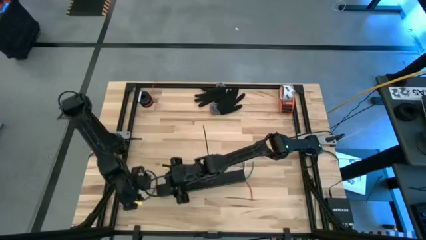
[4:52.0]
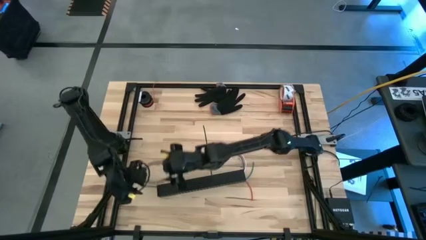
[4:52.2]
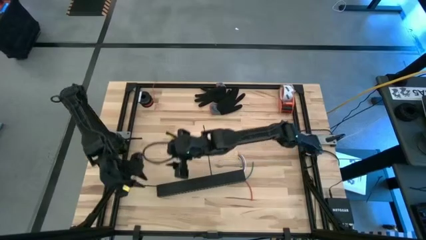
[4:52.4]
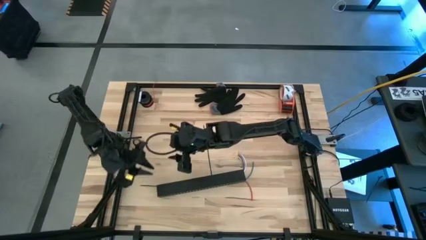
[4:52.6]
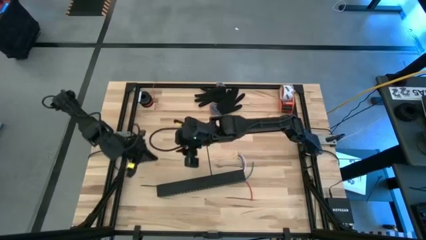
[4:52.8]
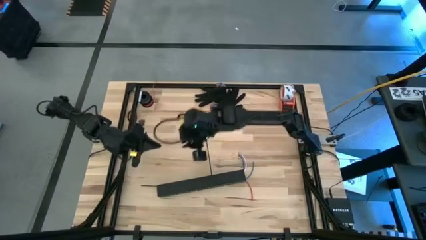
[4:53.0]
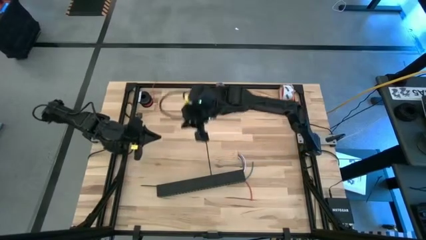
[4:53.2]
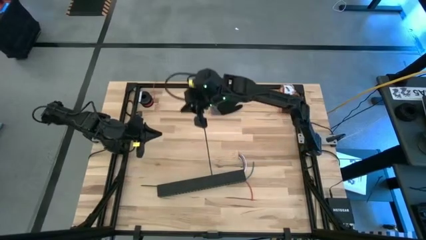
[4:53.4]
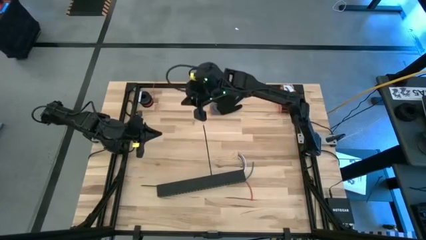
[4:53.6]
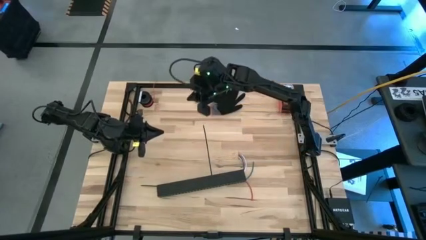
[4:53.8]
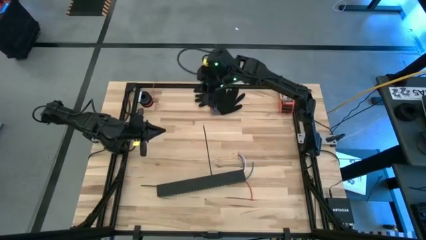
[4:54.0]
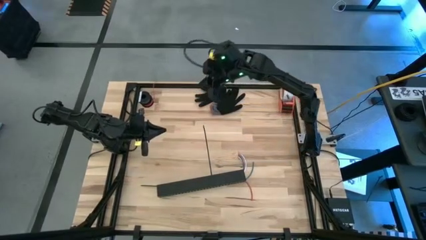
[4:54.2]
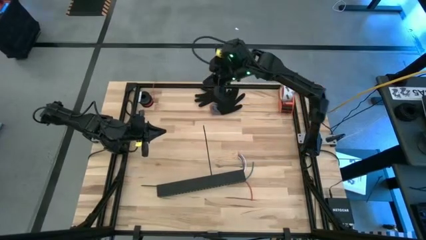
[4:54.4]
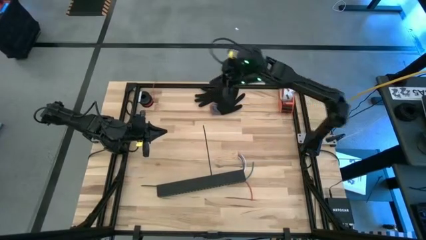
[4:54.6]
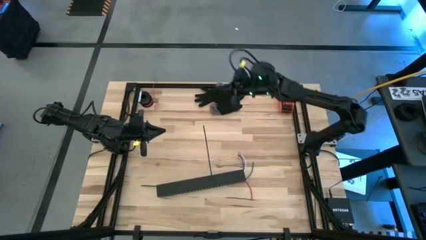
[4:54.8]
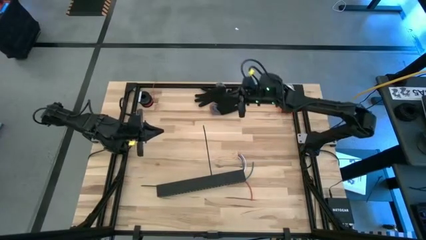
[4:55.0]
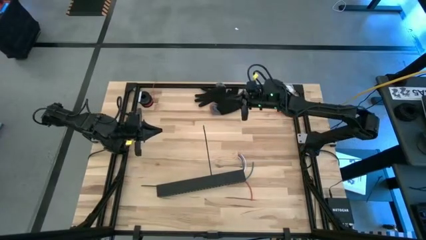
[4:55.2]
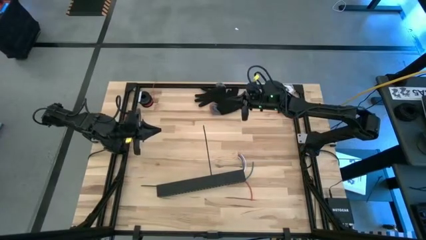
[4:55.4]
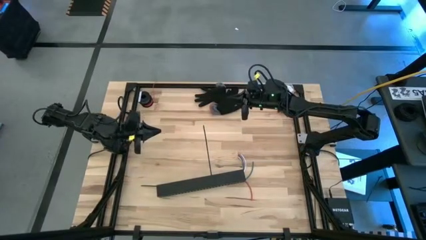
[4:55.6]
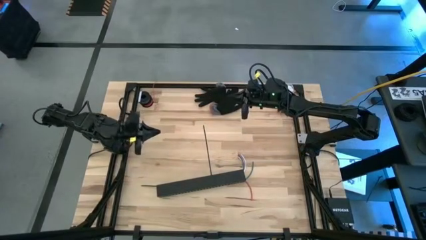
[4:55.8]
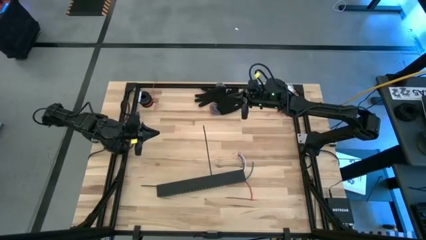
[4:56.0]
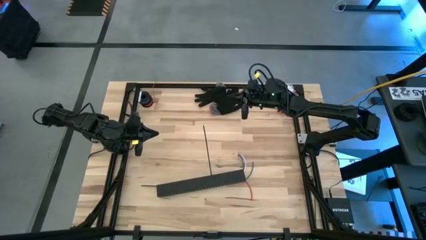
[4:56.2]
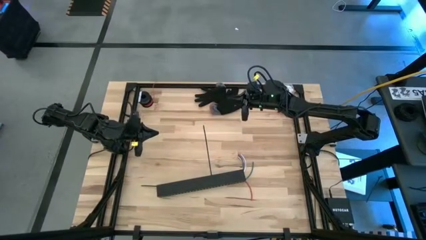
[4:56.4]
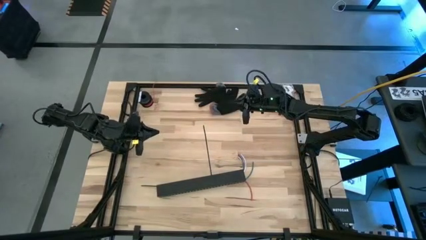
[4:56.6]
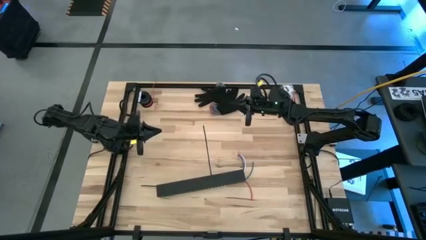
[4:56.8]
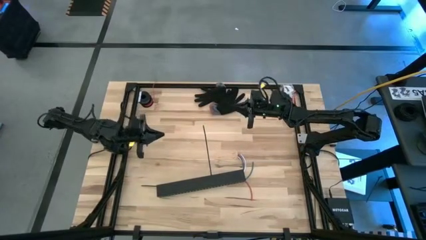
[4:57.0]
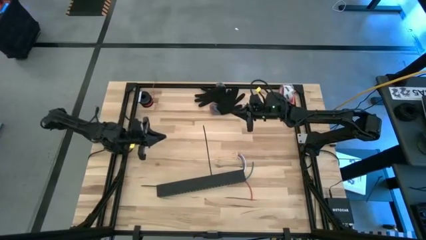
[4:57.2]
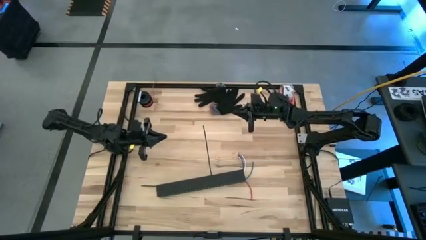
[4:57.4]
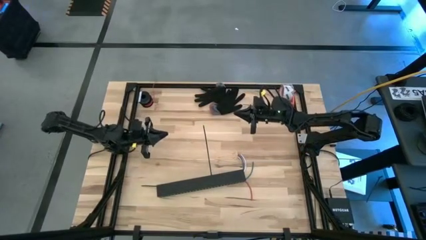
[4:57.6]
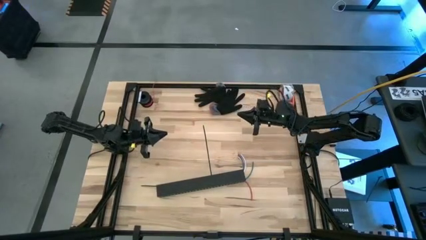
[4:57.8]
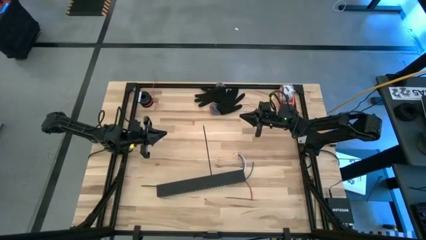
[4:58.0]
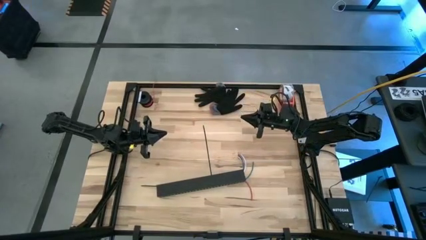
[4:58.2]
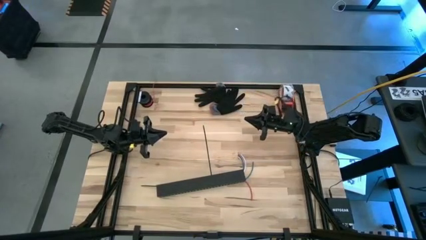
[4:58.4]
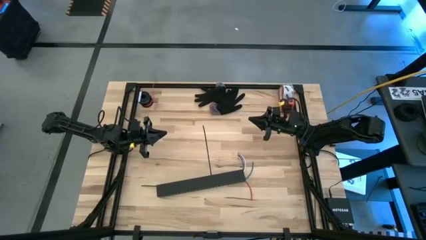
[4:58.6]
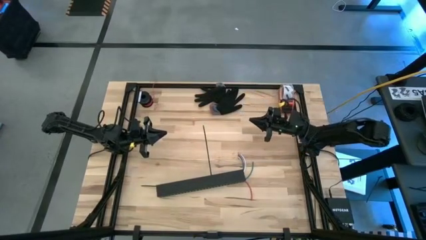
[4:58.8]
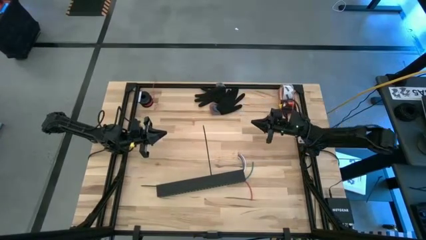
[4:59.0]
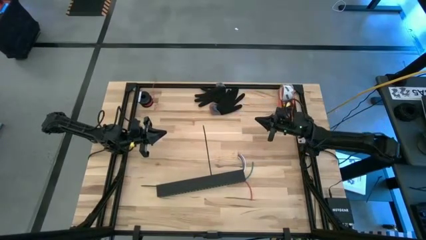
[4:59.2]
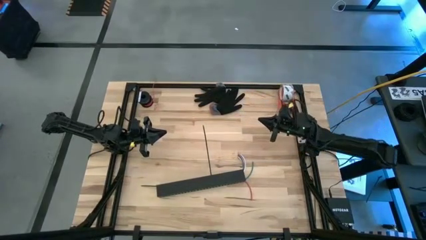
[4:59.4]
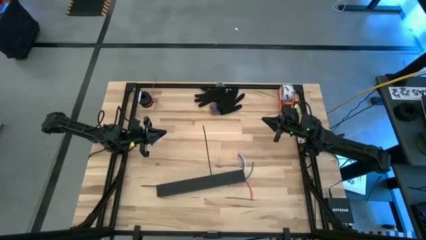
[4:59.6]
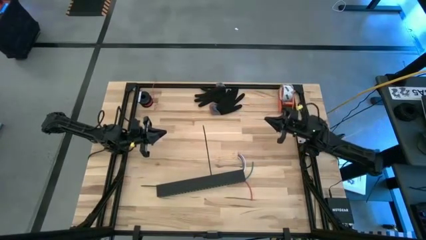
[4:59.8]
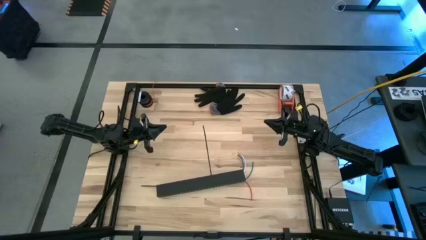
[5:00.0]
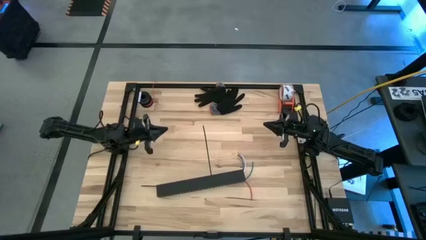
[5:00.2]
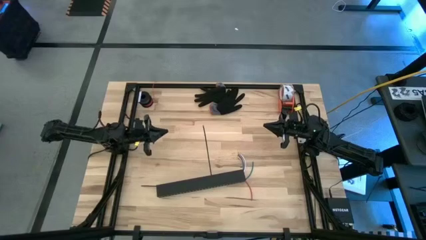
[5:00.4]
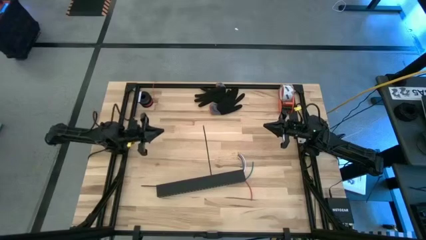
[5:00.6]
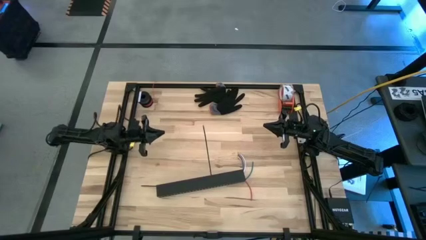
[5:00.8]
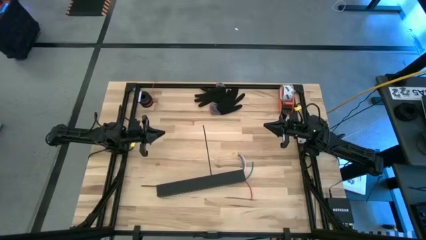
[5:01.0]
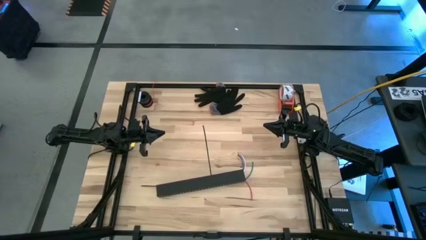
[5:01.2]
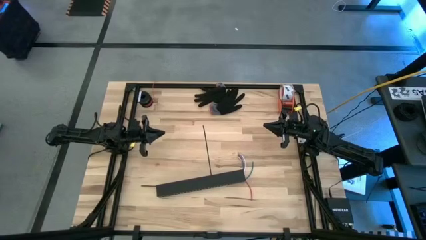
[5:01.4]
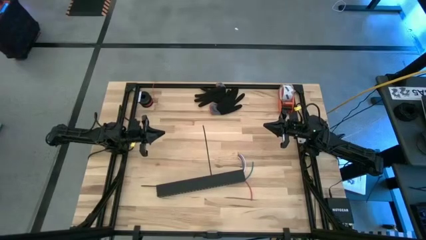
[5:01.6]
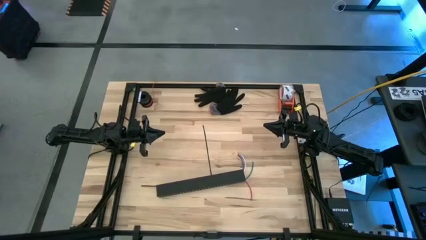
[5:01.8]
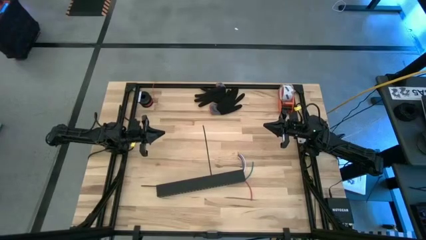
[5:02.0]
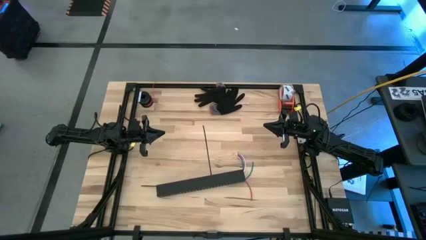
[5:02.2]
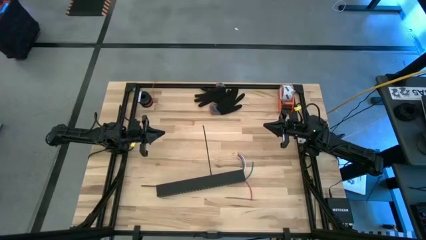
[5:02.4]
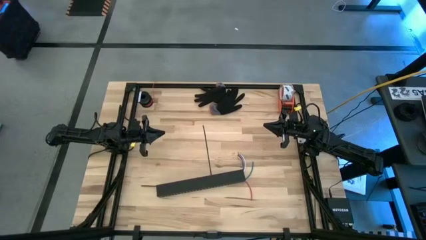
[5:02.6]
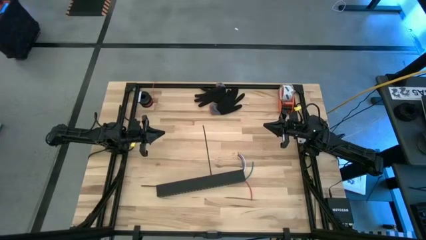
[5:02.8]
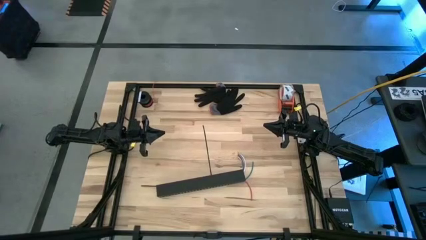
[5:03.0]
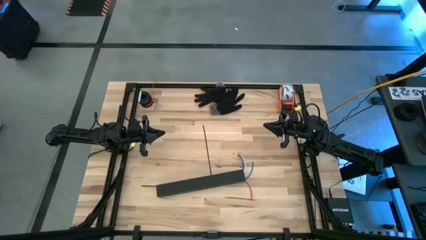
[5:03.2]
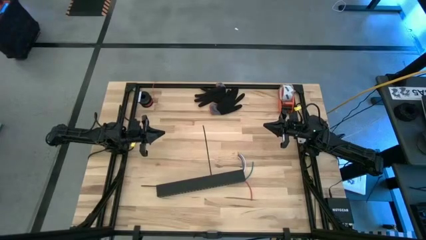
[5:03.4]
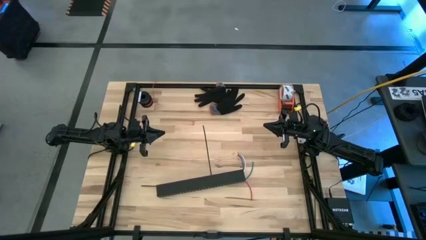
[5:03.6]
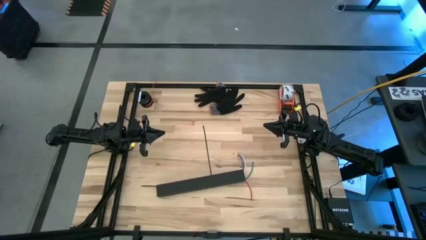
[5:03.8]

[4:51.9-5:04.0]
Task: Ziptie cables
Return to Home Position
